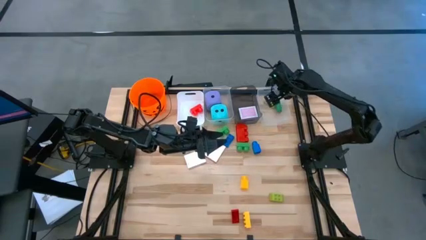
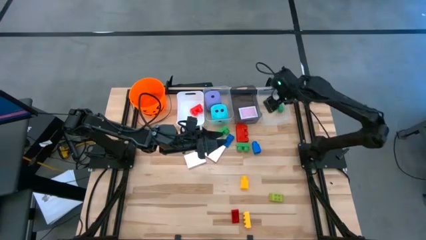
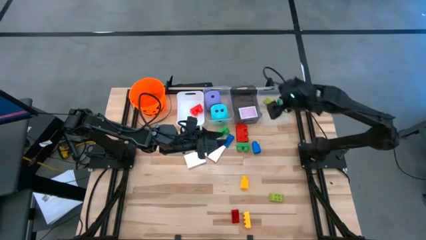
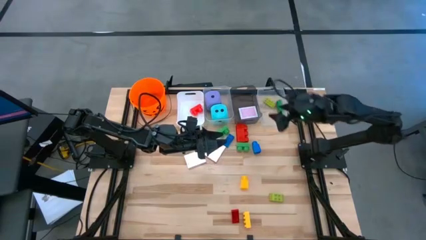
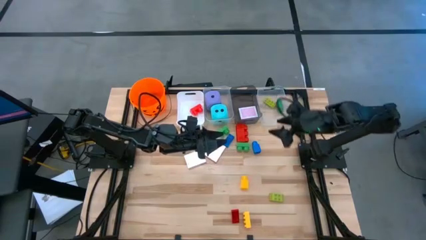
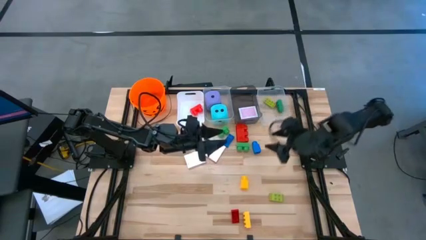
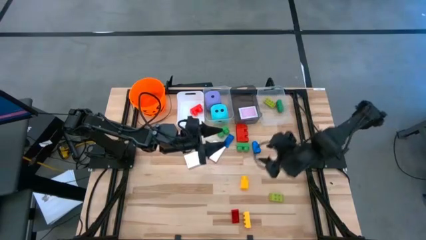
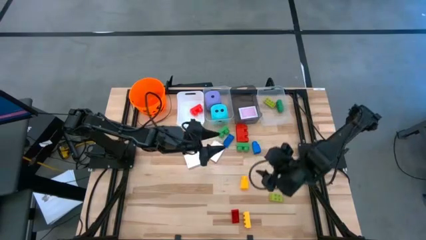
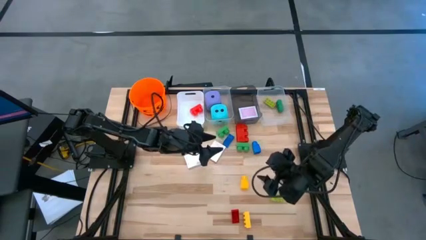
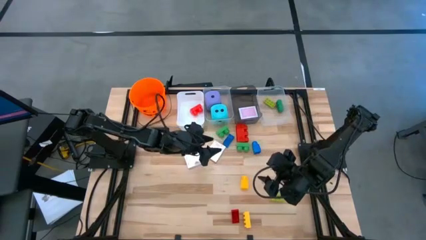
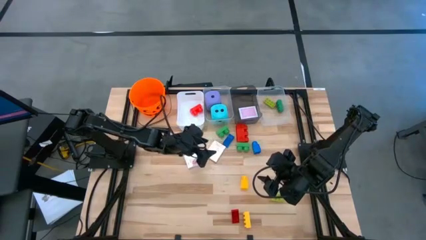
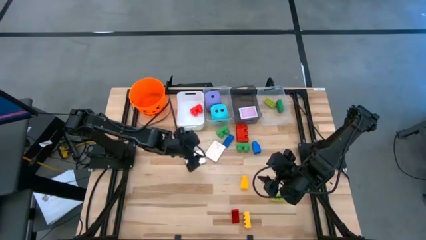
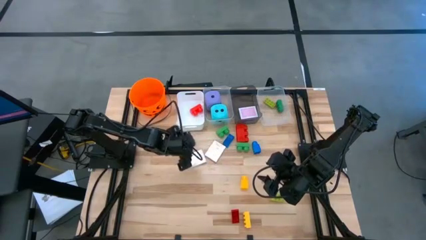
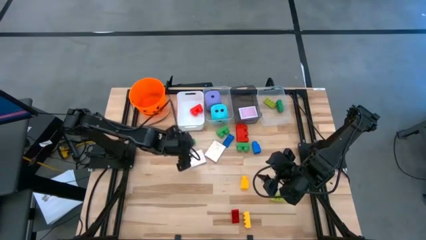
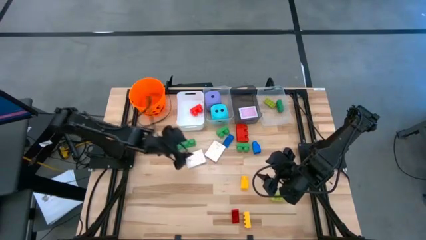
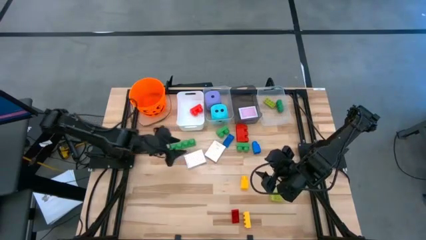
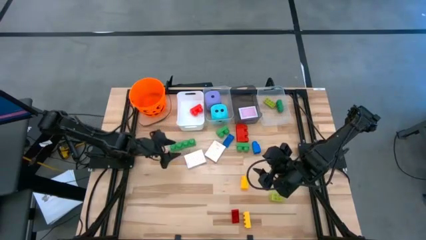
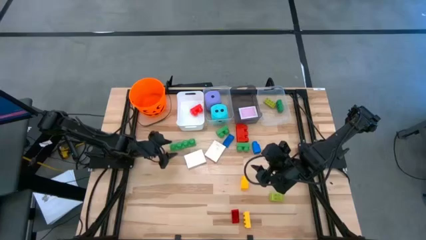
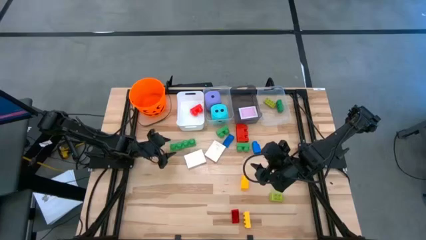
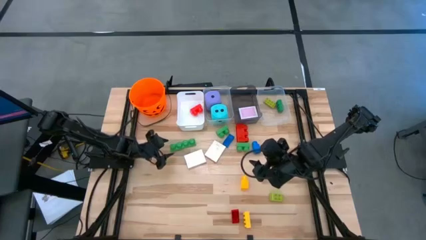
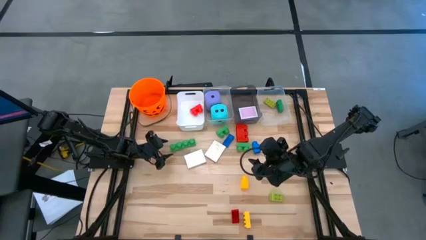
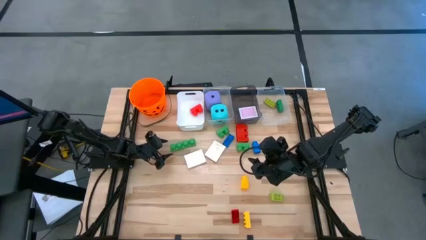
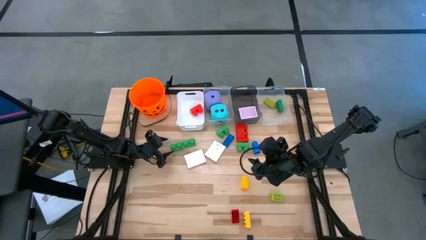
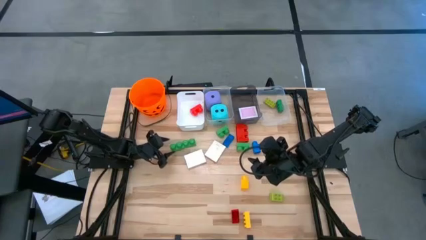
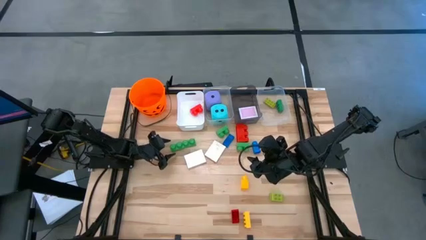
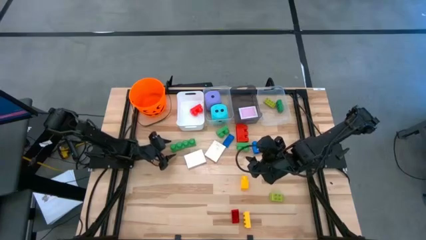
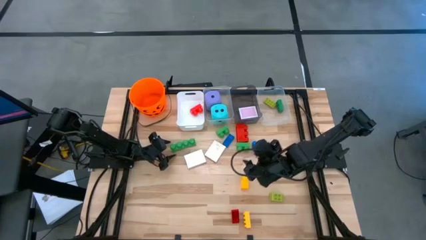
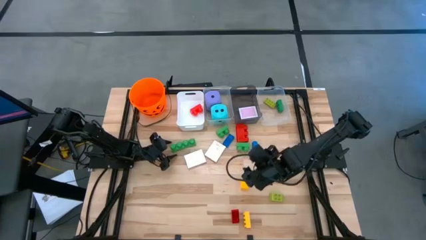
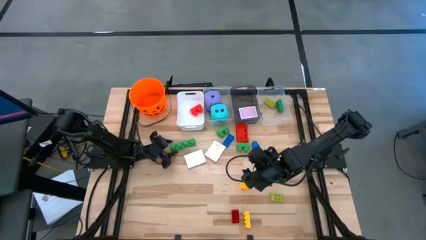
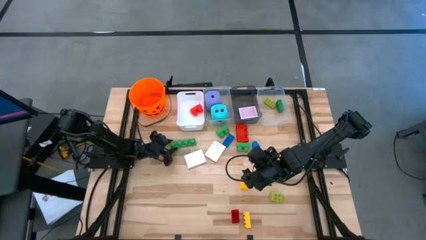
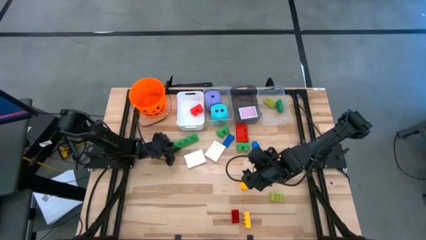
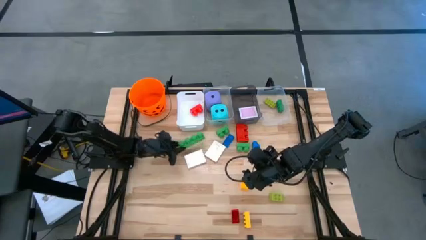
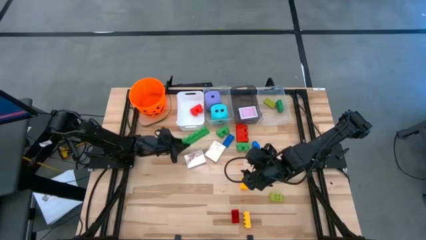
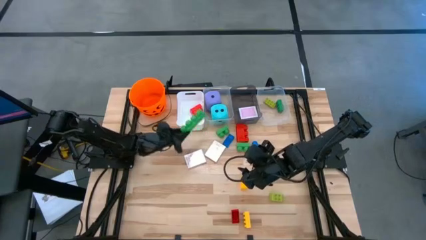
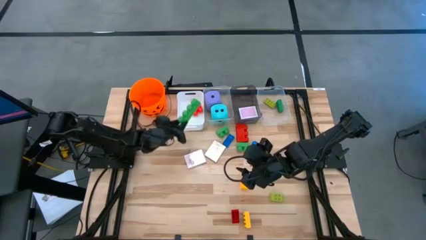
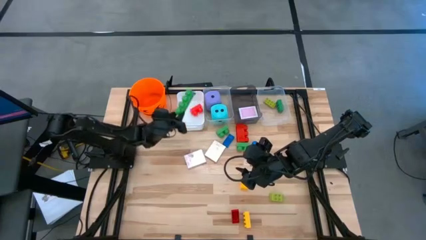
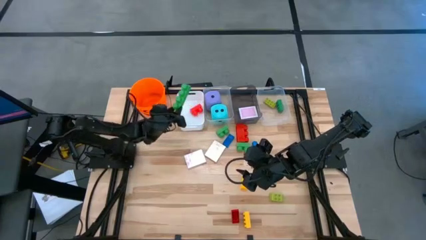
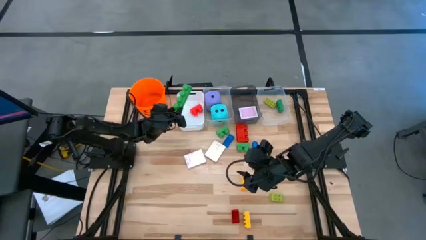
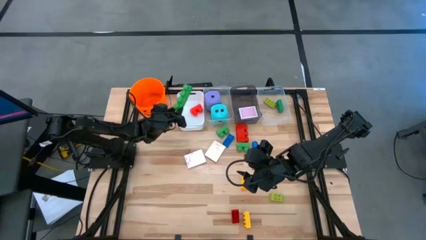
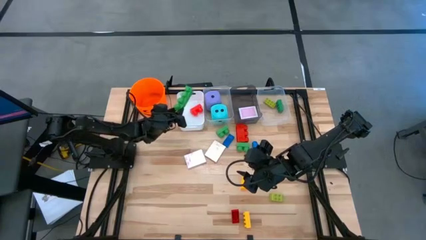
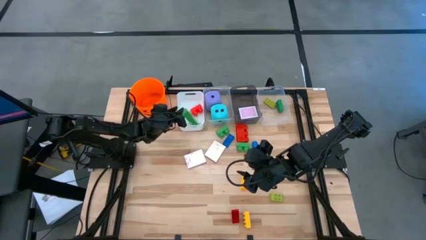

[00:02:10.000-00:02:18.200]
Task: Pick & Place Toys
Put the 4 stud green game piece into the white bin

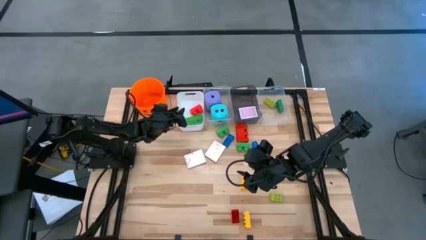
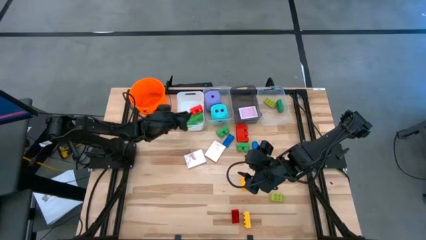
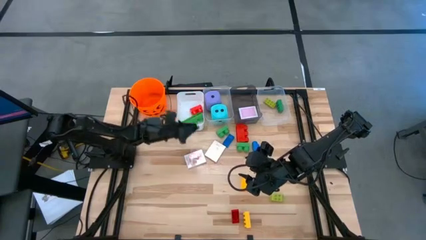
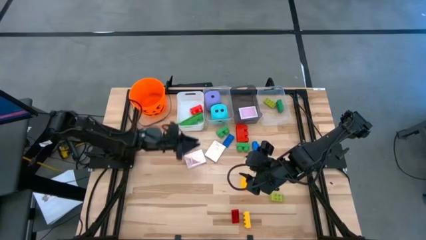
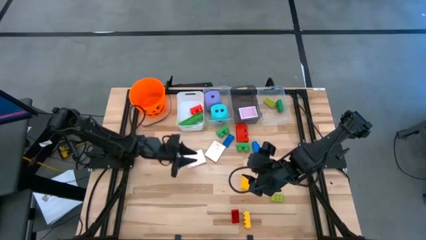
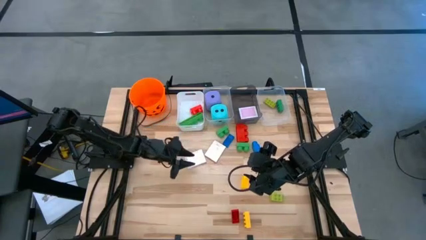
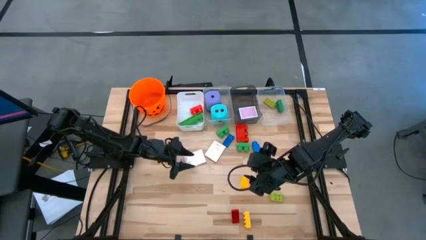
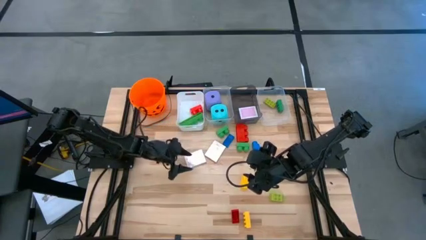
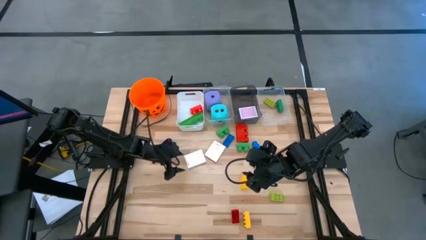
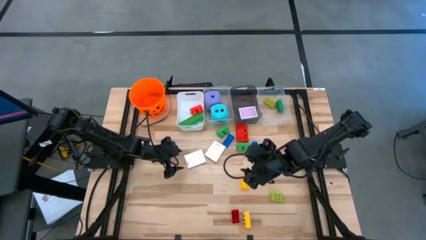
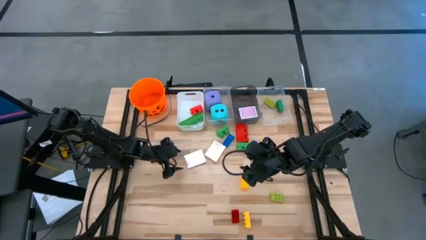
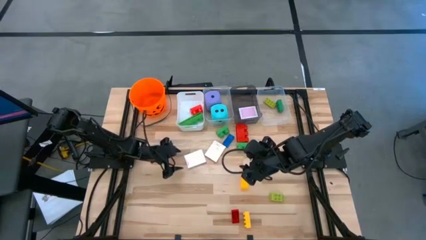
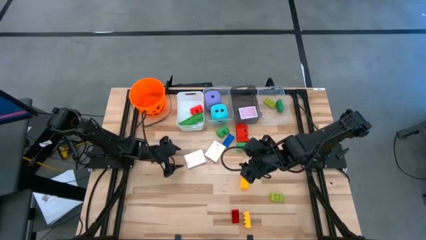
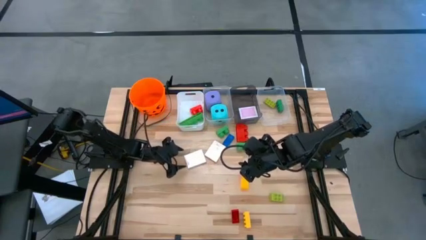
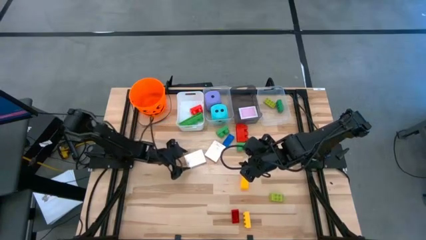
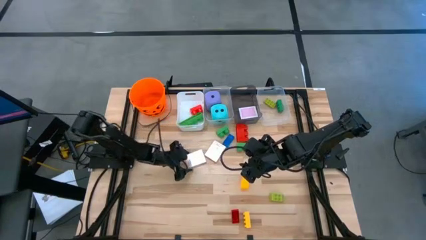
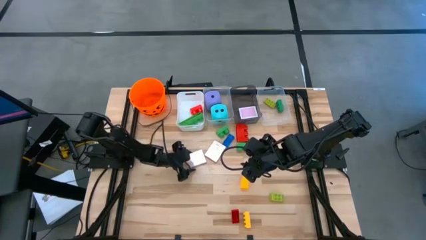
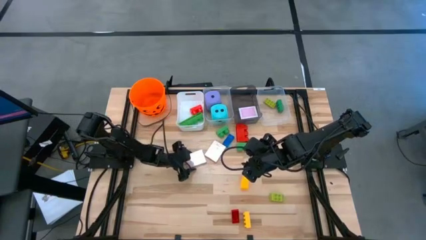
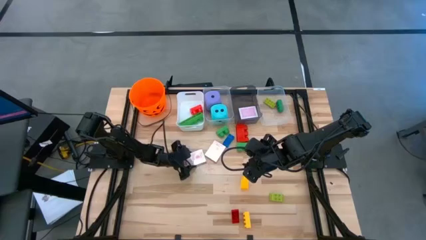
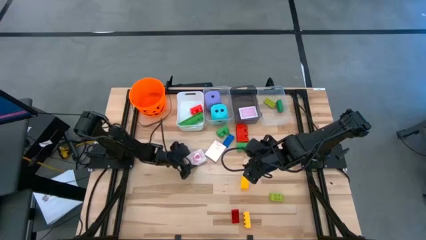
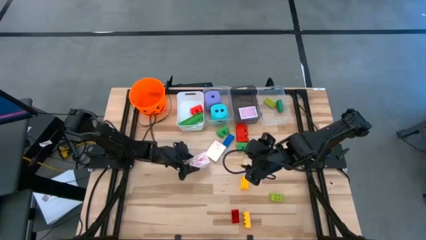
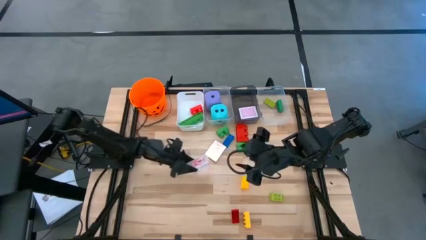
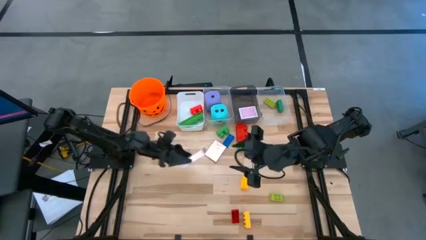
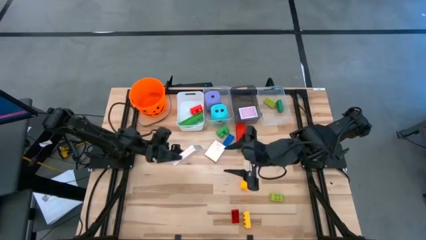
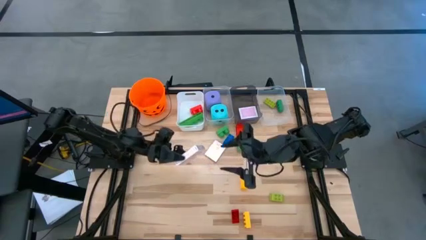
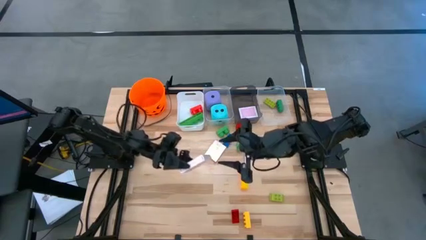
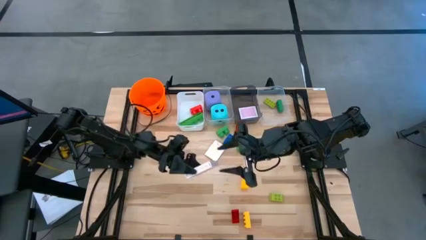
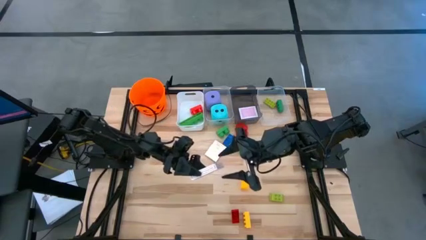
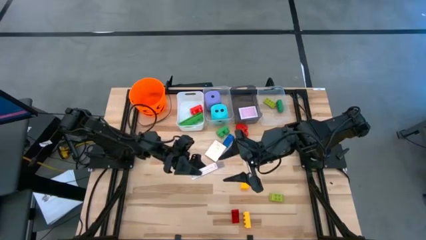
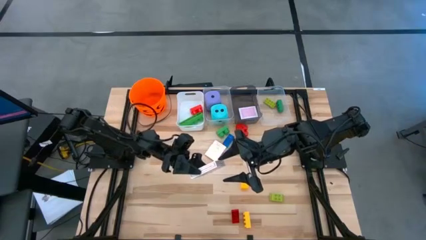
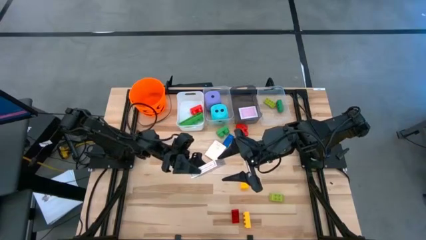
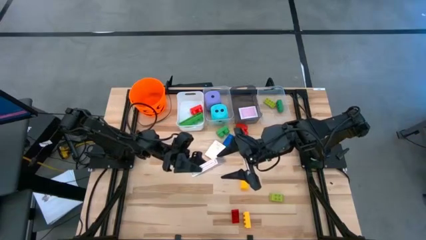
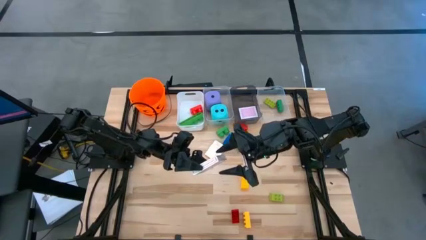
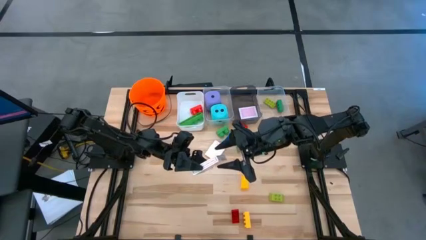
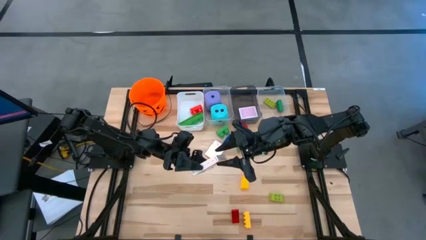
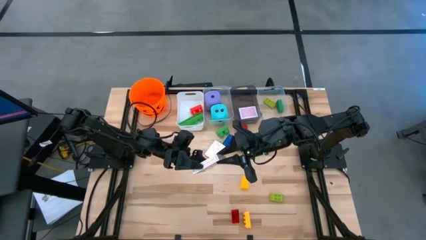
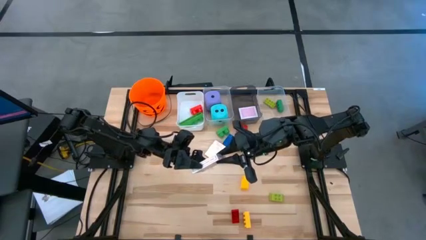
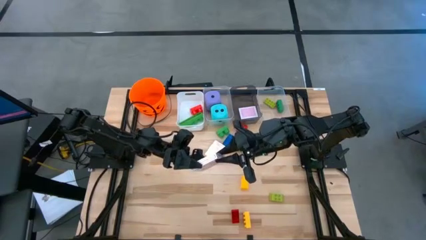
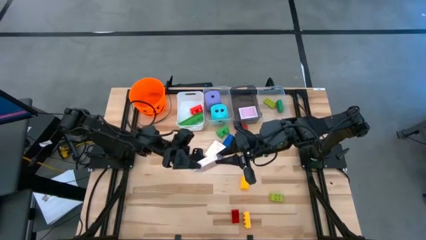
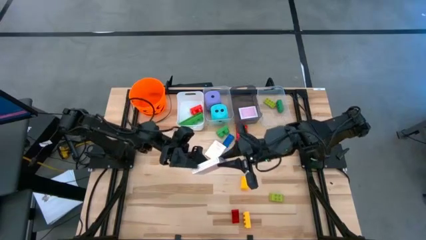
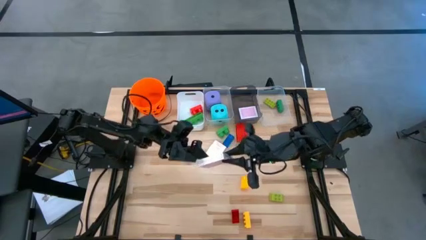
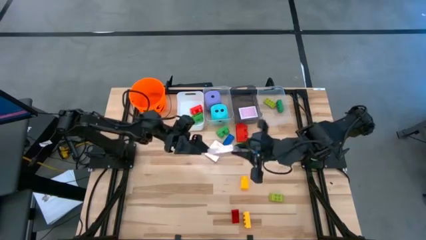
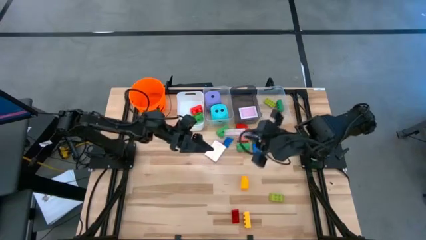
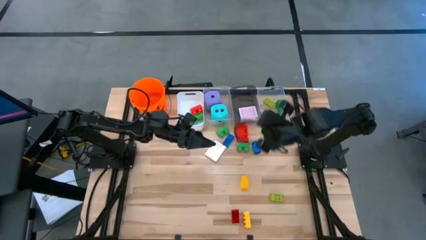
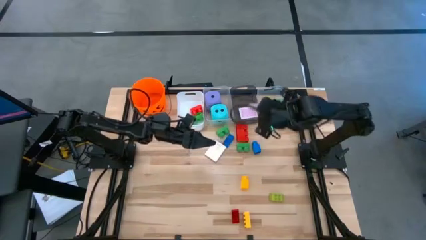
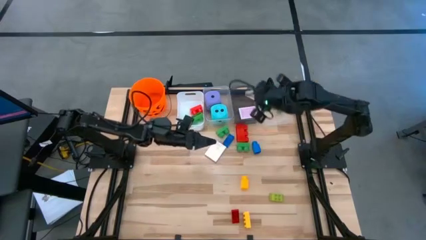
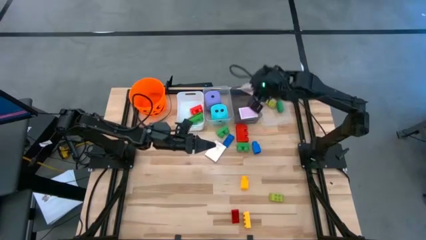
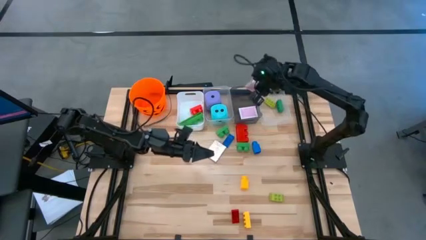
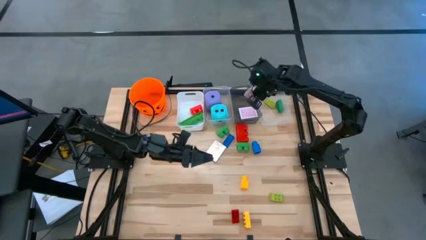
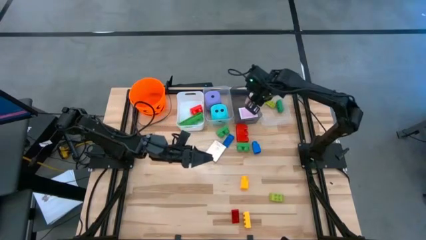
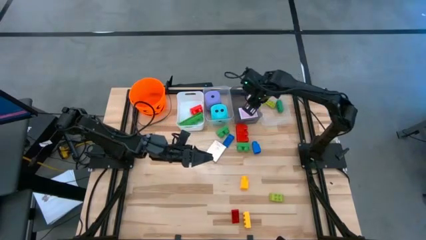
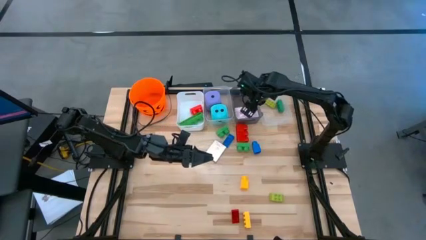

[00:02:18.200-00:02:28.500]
Put the red deck of cards into the black bin
